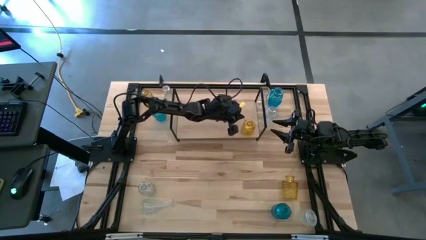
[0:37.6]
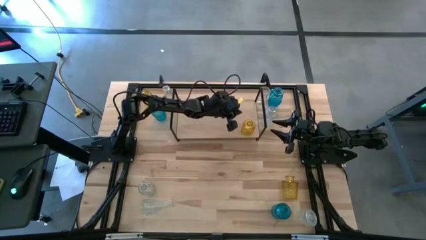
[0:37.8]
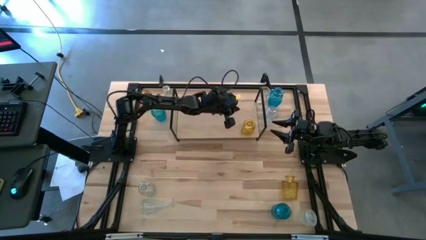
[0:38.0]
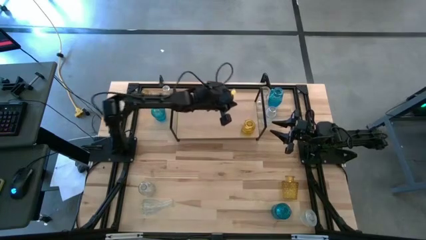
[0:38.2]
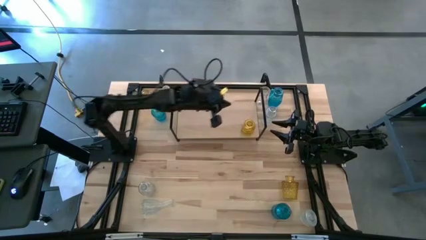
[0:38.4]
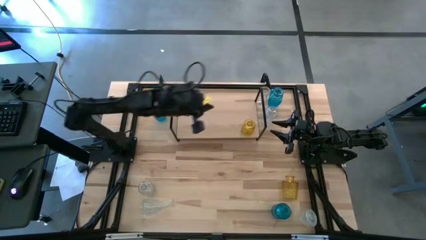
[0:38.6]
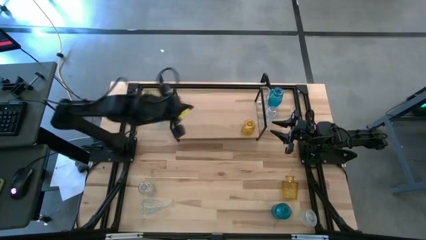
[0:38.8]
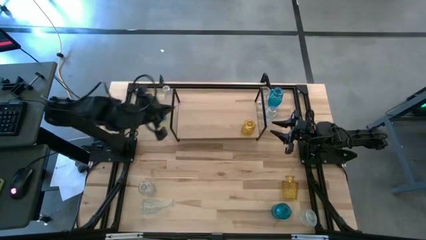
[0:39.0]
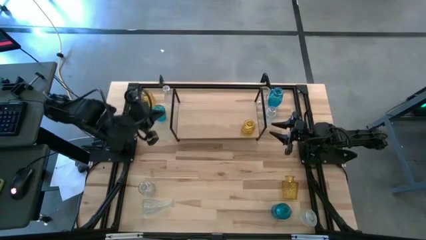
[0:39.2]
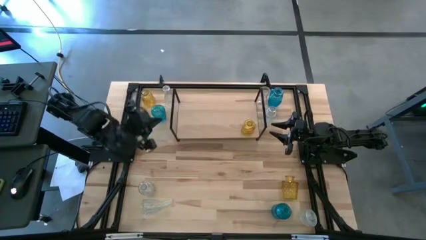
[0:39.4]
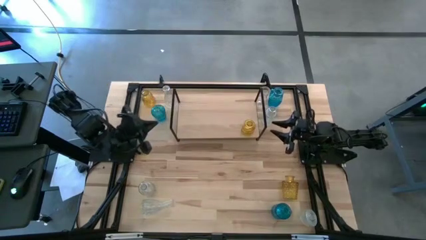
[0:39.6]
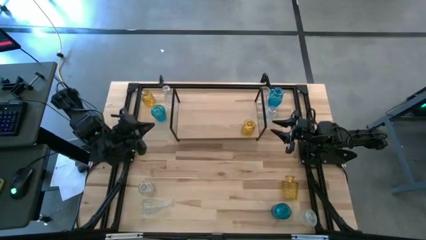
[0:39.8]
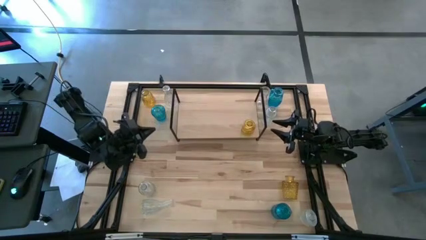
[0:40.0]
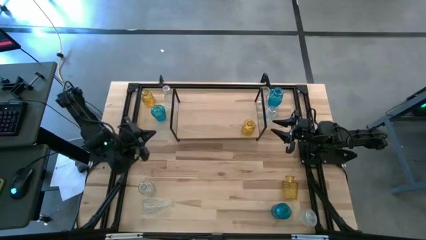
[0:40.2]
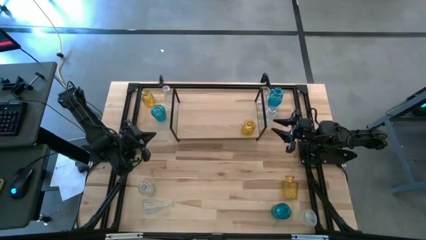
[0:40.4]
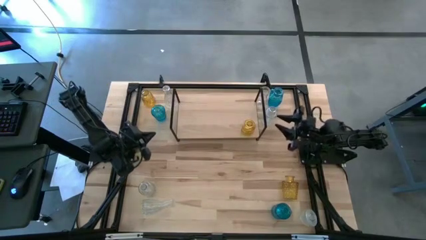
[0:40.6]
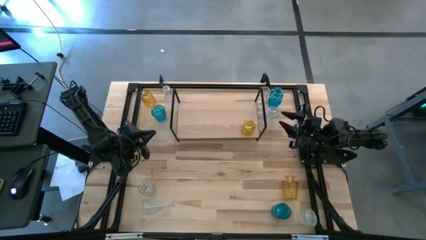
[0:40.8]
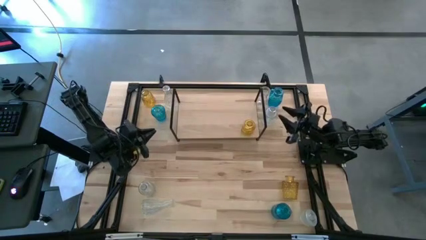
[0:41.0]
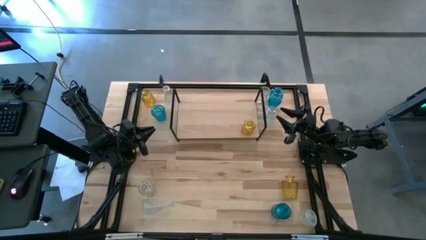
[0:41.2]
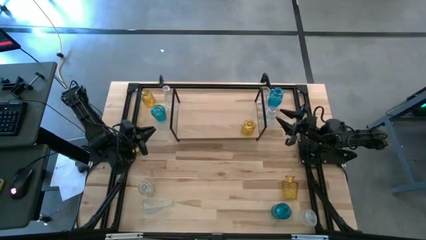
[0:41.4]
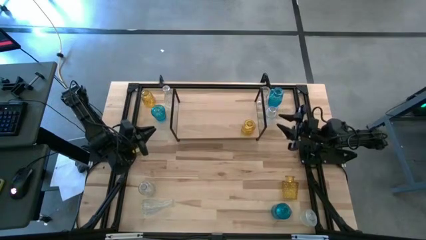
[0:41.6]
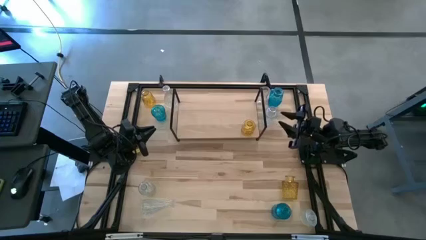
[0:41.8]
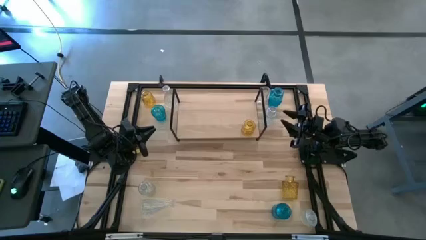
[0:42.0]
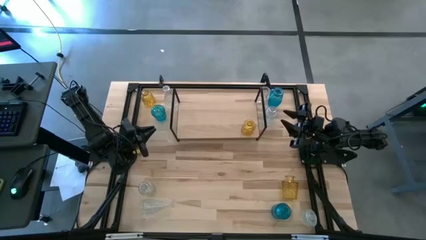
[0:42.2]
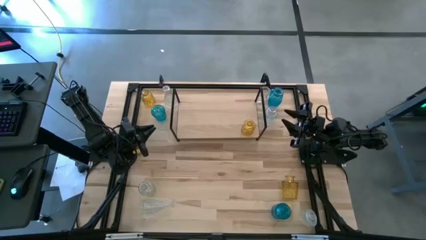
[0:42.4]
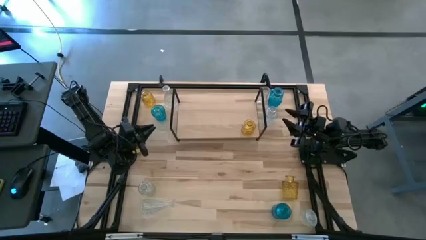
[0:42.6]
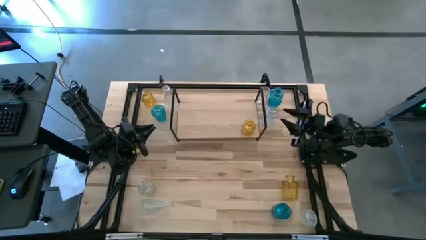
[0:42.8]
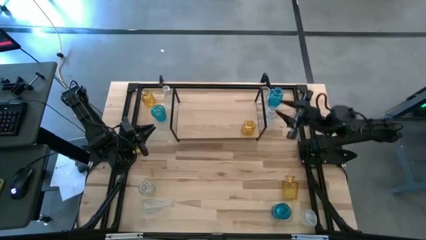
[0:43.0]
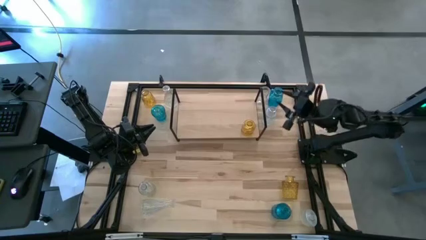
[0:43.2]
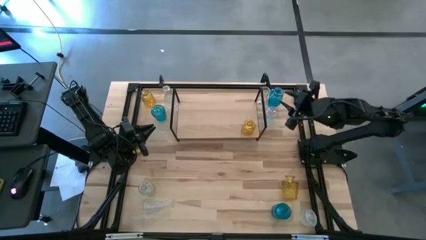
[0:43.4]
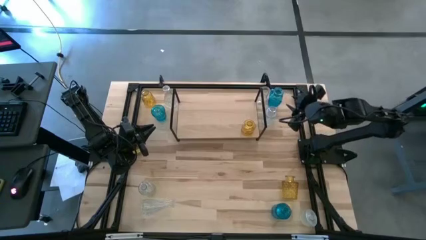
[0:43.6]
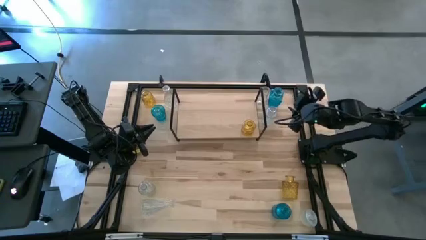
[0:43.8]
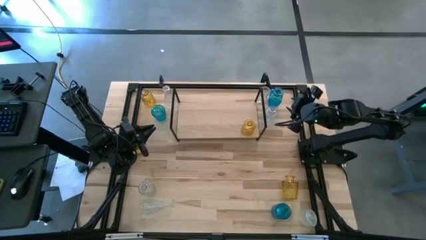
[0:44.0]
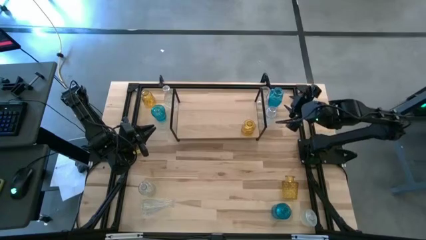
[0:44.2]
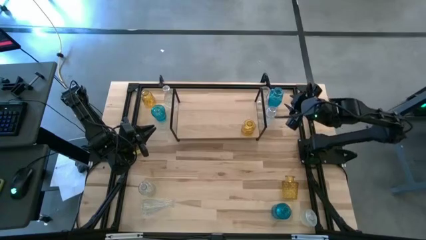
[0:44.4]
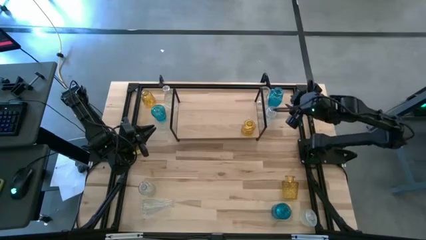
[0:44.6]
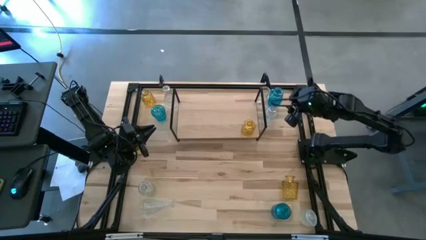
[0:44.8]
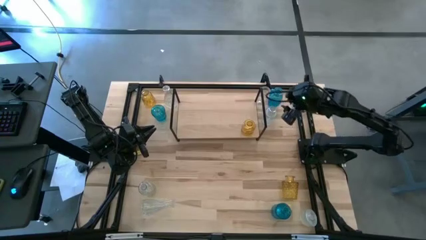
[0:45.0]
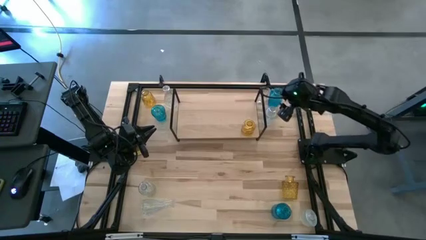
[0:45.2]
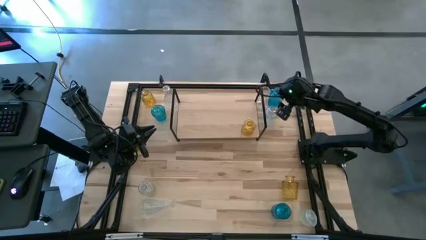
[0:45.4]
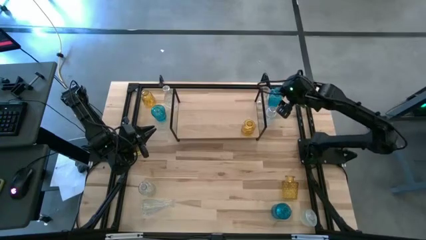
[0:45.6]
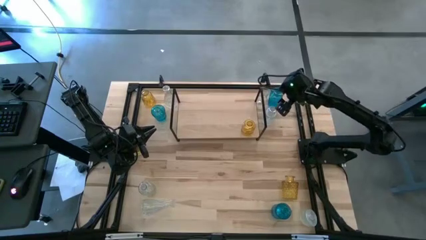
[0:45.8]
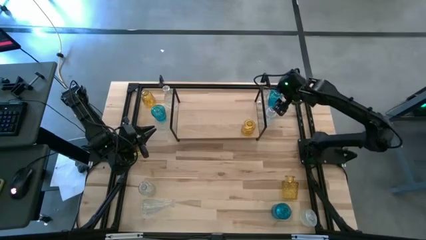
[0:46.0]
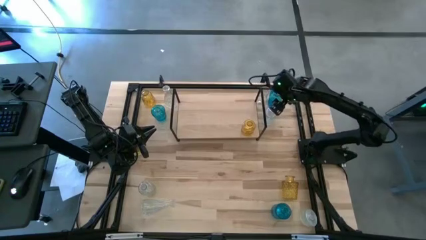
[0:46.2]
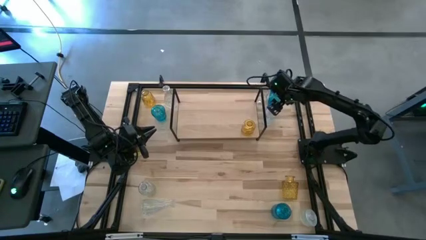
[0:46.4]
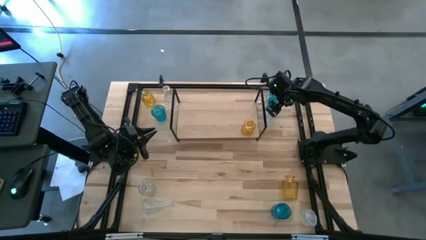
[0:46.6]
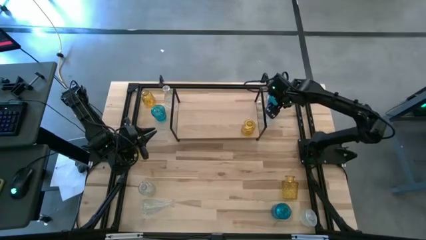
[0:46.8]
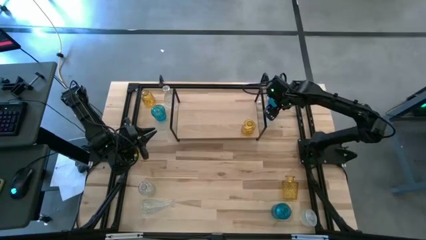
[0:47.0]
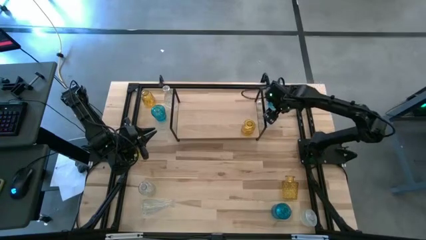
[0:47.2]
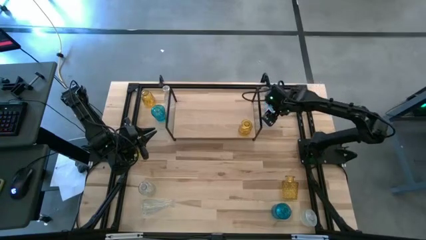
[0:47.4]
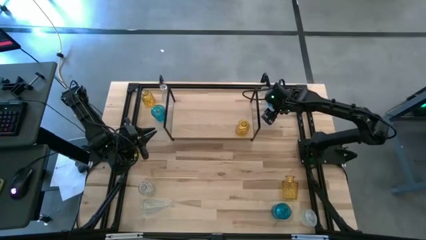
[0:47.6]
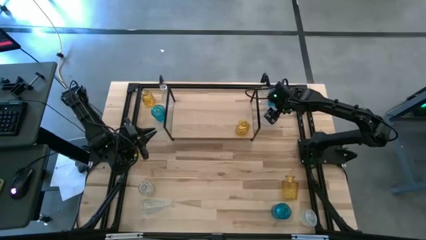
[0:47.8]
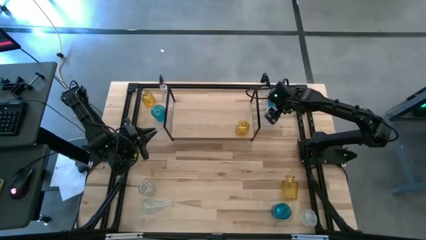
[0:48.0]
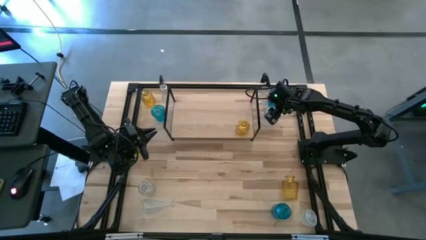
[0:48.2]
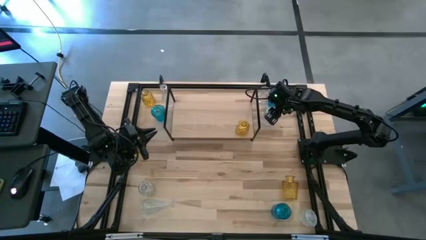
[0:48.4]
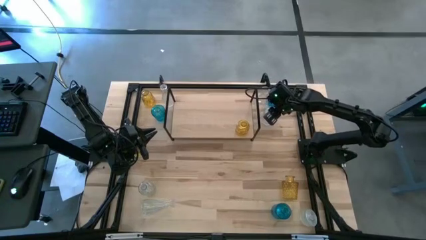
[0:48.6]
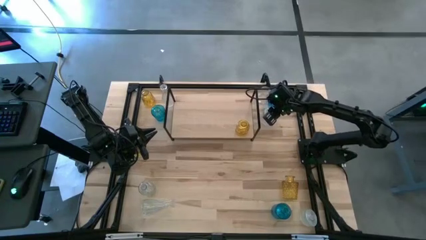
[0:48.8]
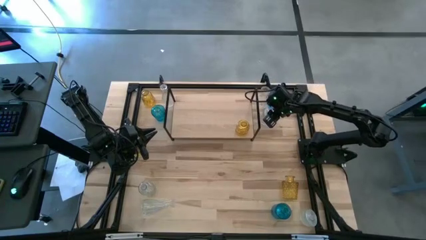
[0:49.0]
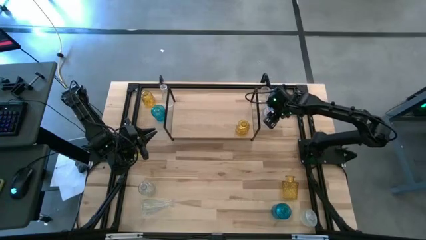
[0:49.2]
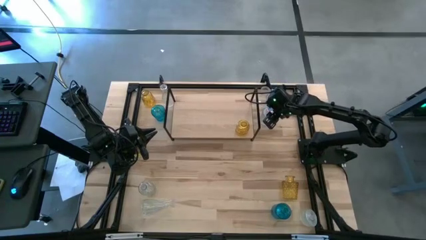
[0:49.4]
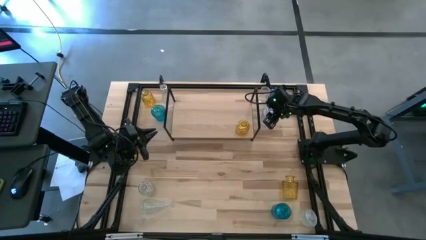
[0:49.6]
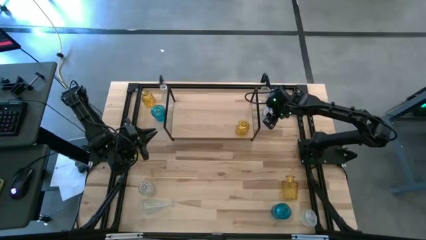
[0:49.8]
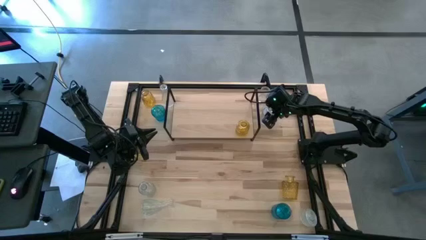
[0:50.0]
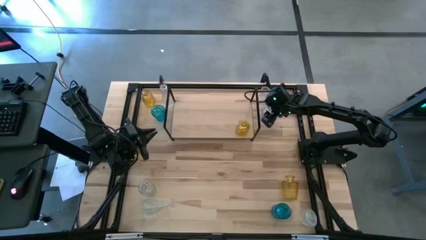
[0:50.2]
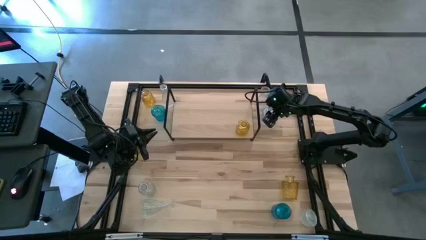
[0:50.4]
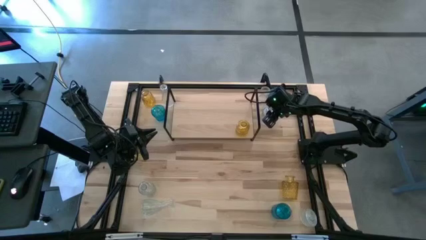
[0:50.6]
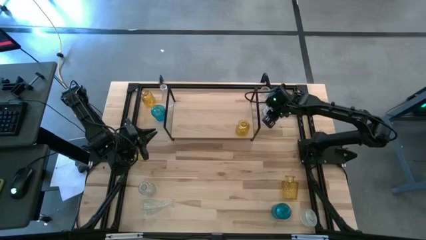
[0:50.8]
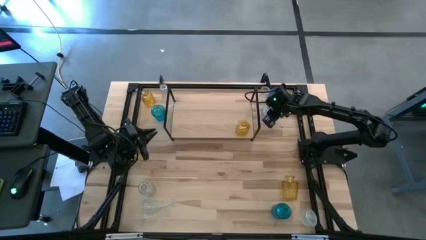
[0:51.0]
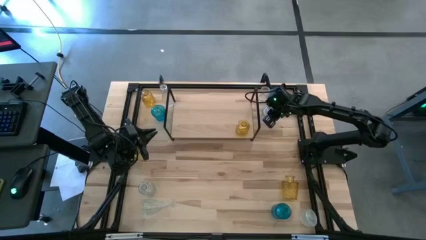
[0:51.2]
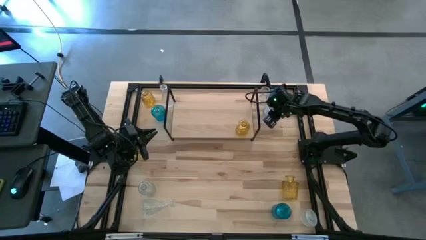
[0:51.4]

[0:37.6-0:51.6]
Task: sort vases onto shelf
Put the transparent vase on the shelf
